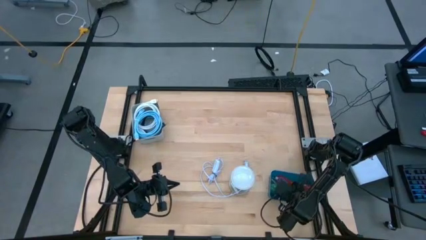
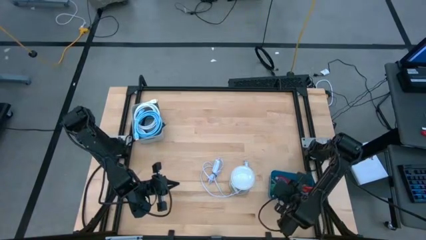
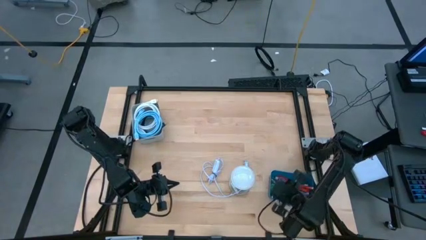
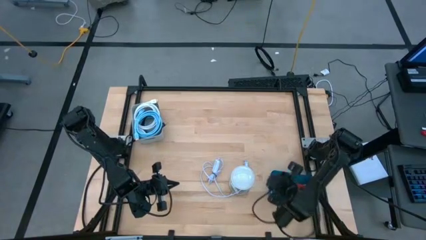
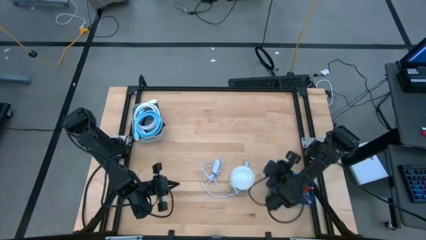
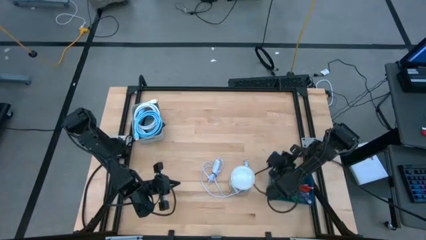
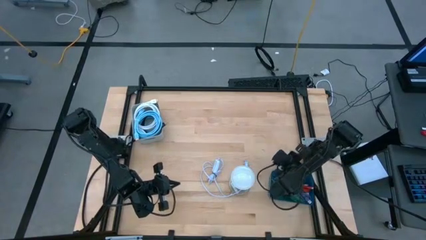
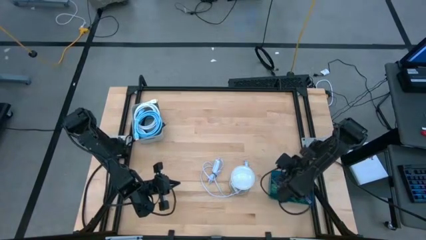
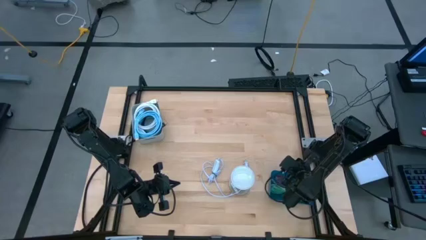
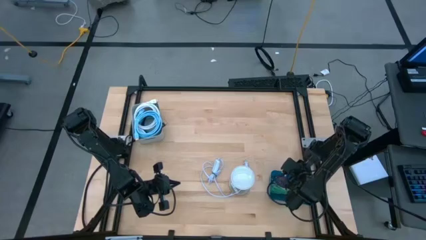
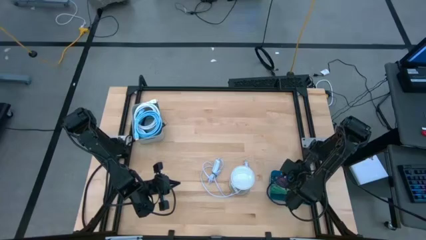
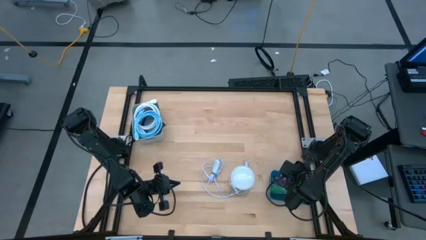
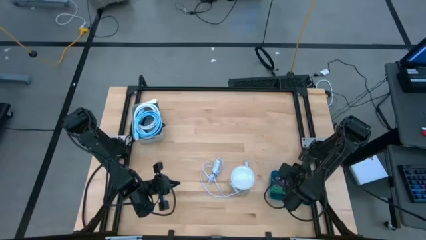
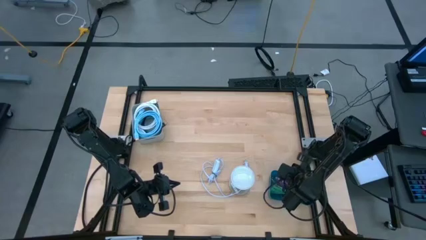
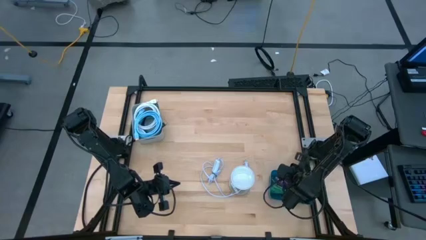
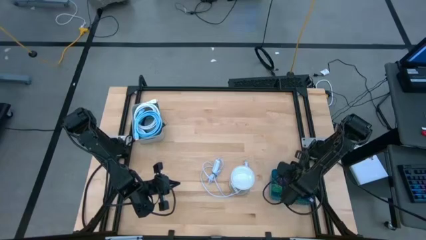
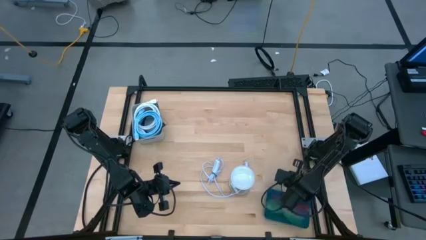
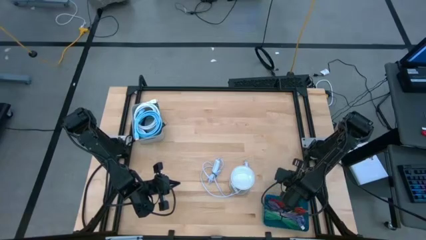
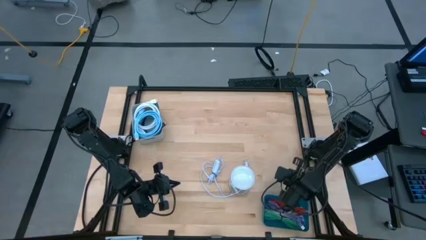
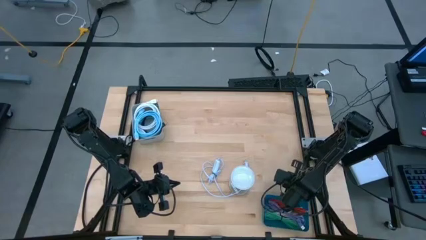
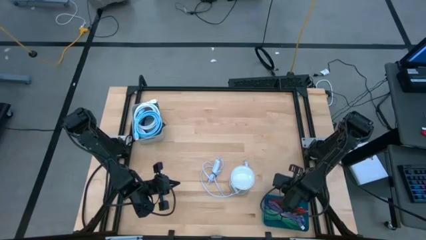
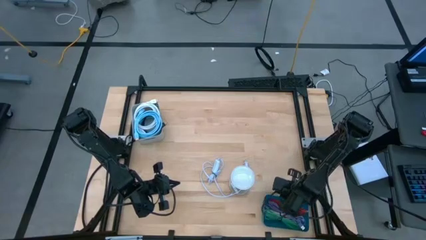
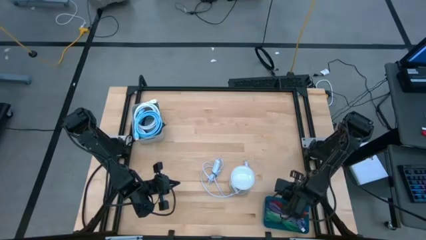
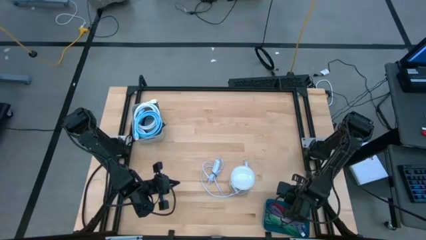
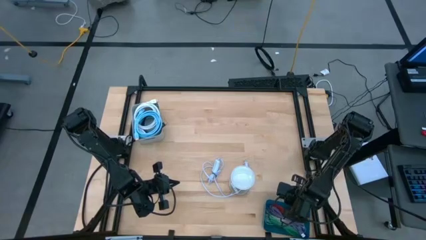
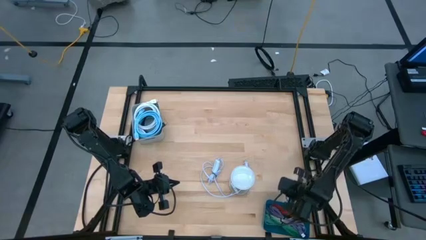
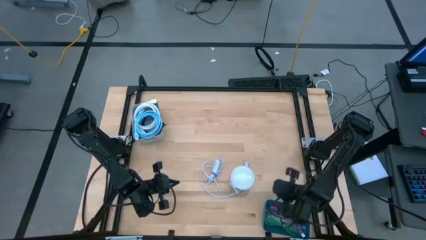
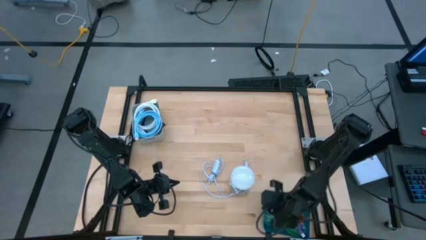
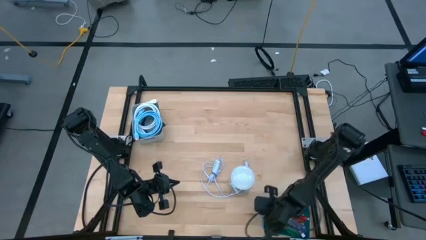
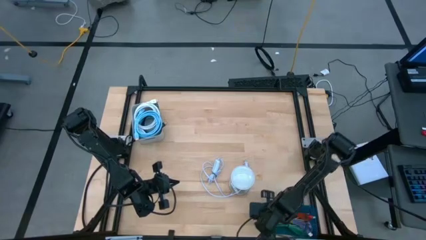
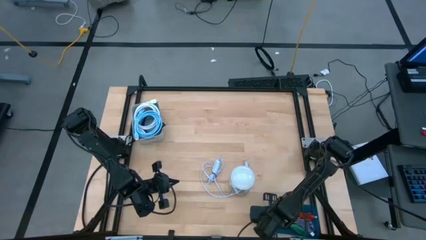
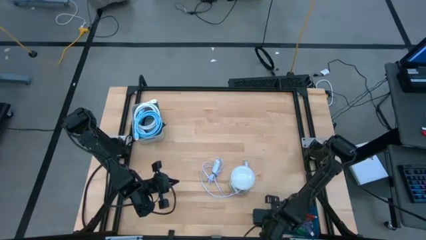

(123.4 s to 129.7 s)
Task: Pick & Place USB Port
Move the blue bin to the bottom right of the table

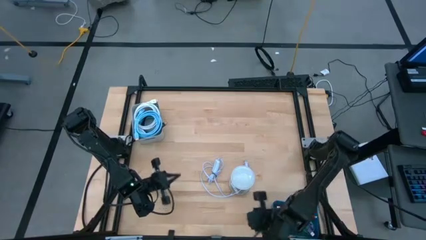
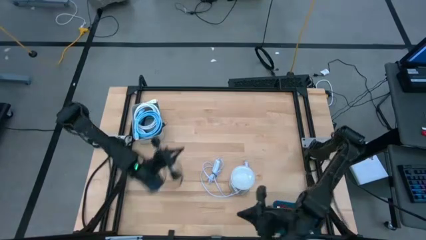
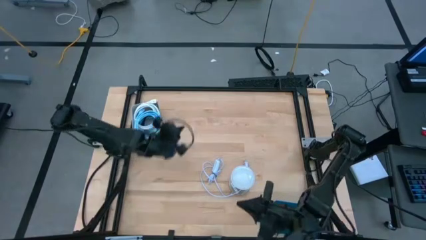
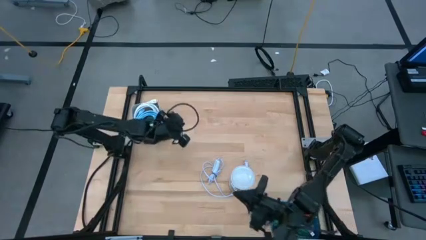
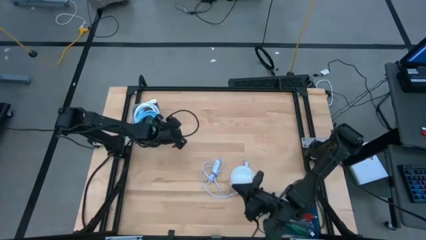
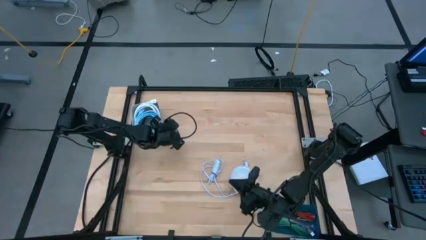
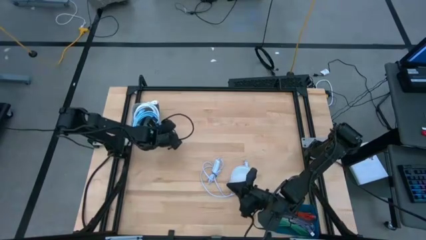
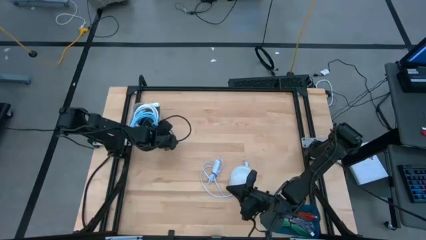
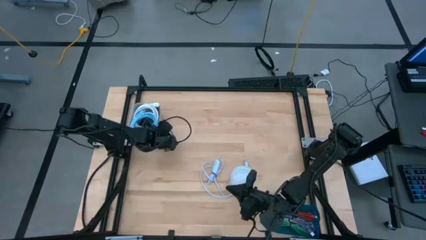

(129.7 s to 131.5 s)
Adjust the gray bin

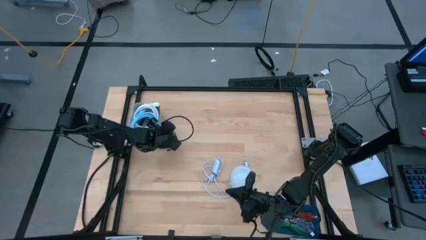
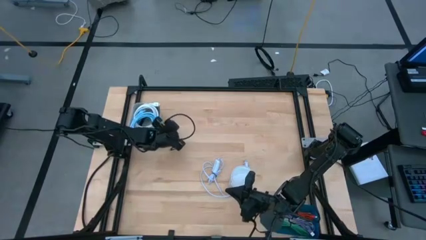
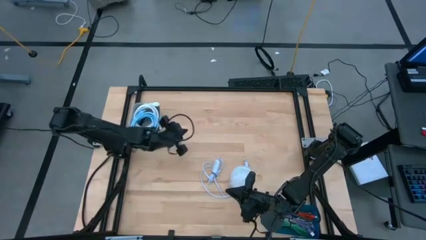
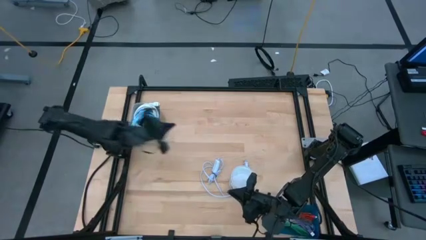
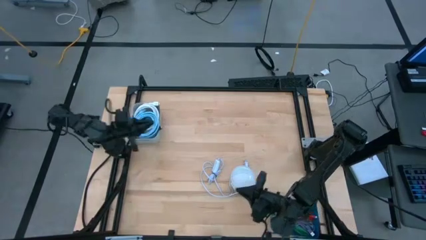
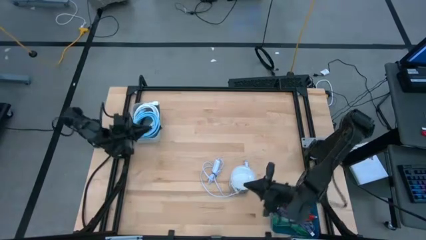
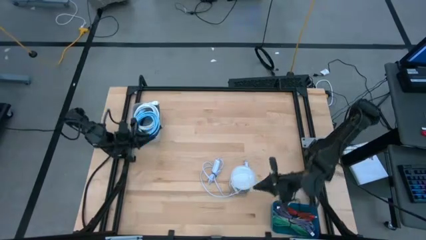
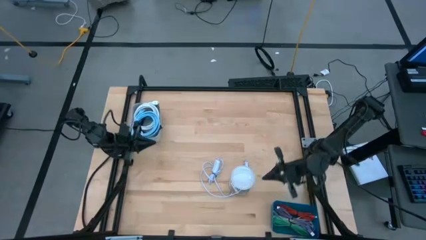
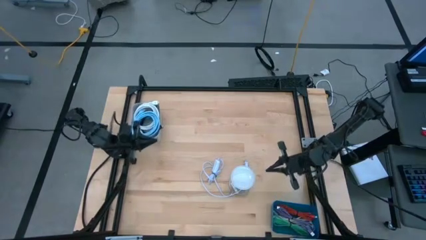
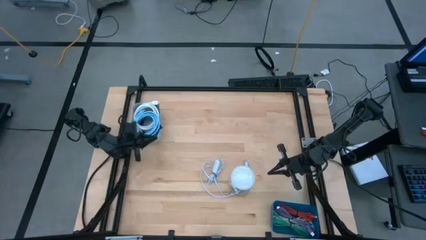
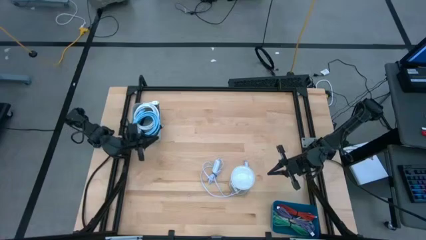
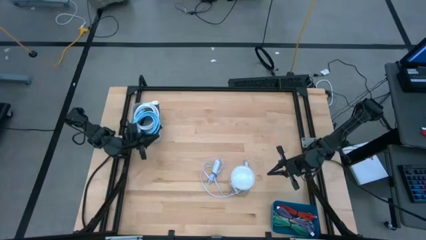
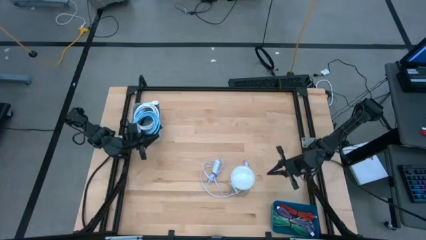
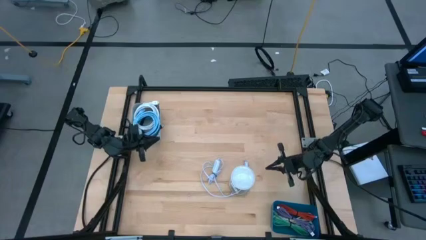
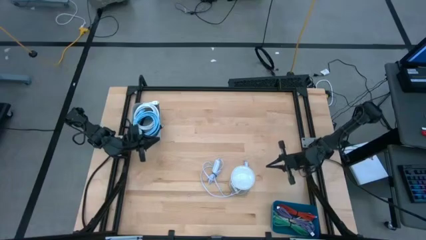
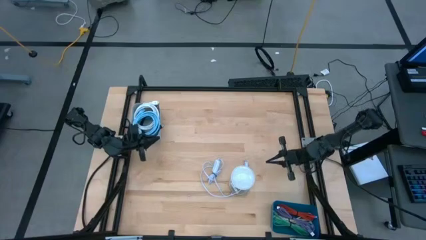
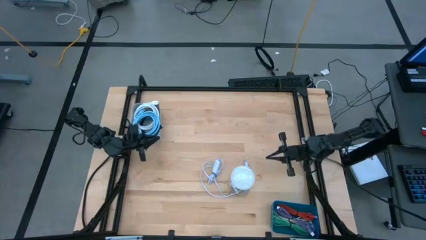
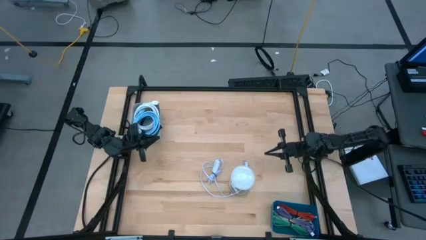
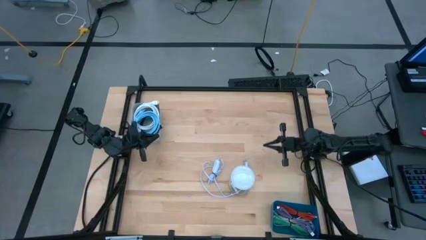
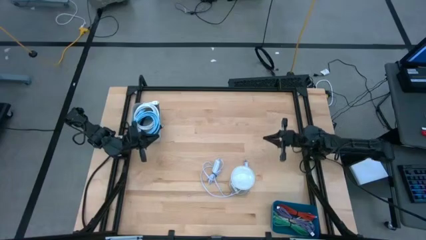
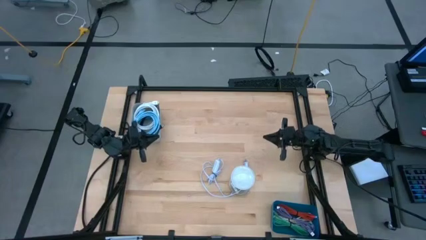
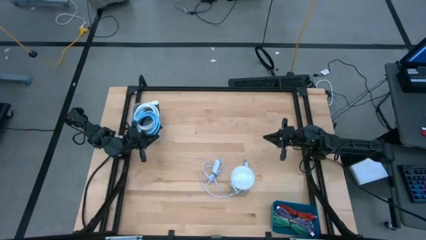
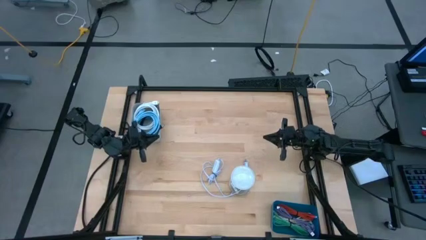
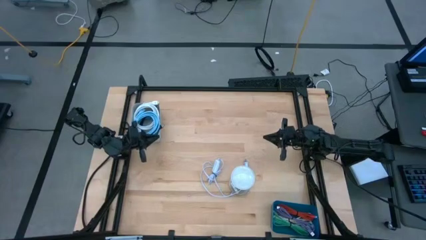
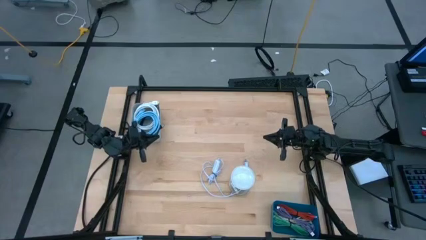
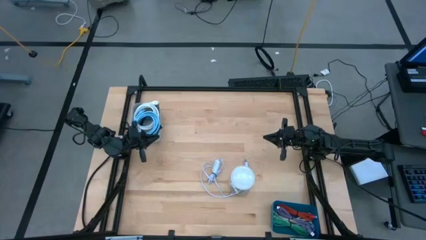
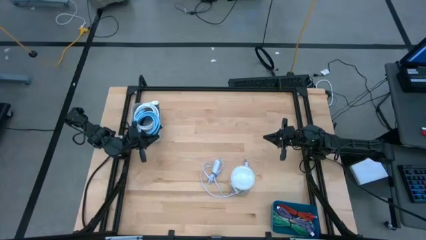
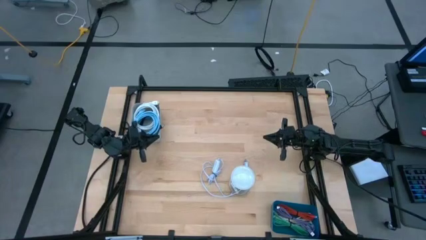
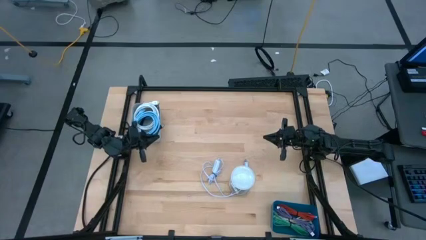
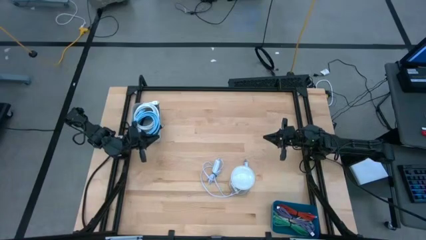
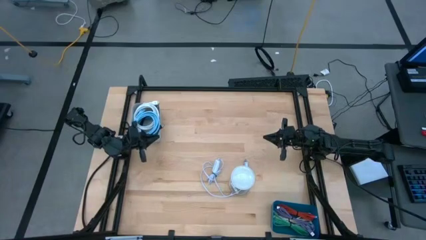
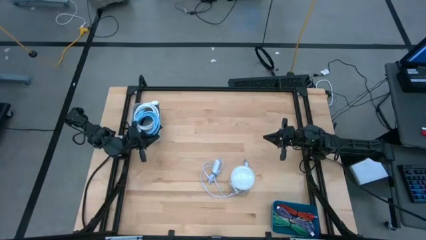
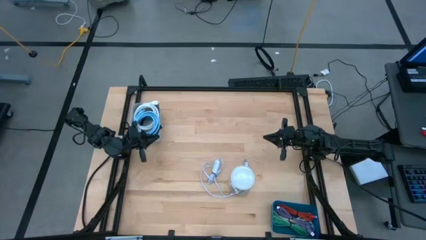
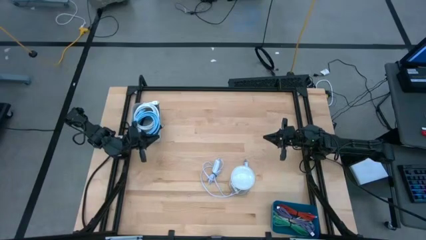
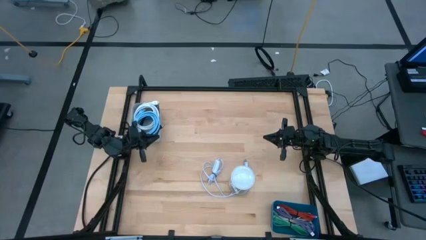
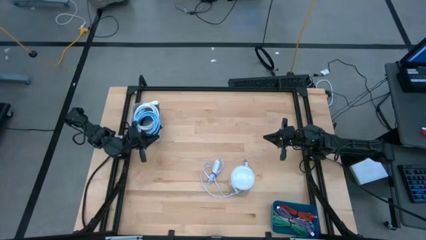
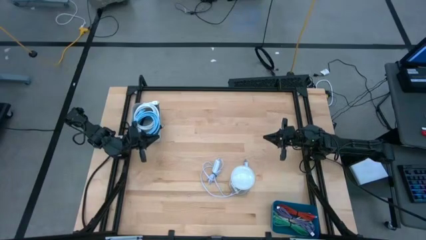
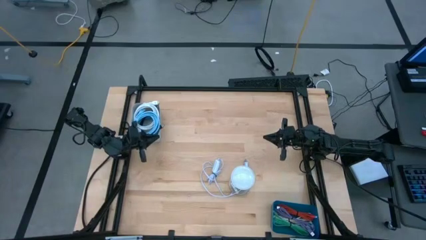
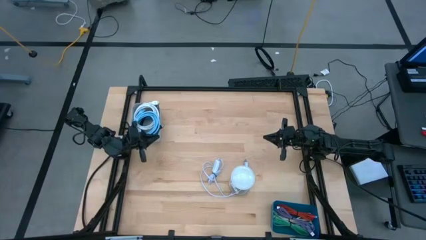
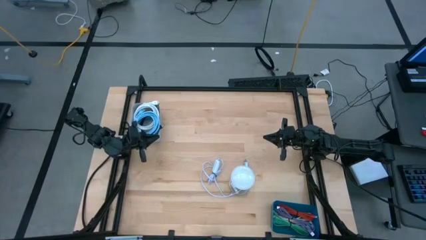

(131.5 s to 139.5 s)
Return to Home Position
